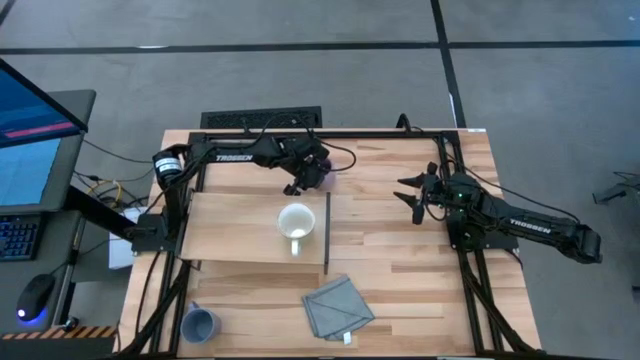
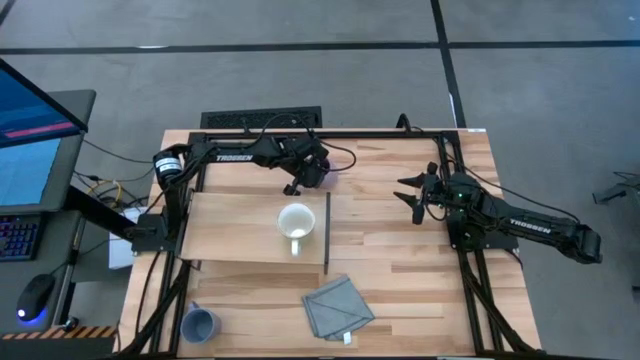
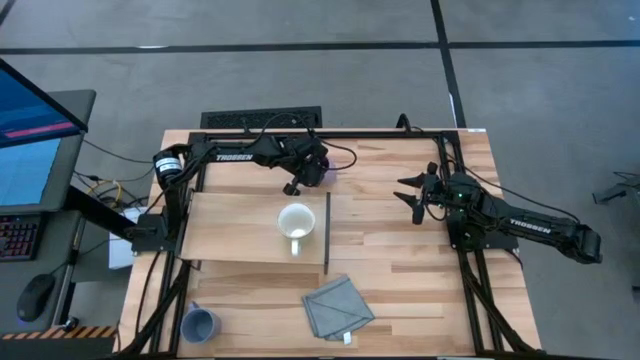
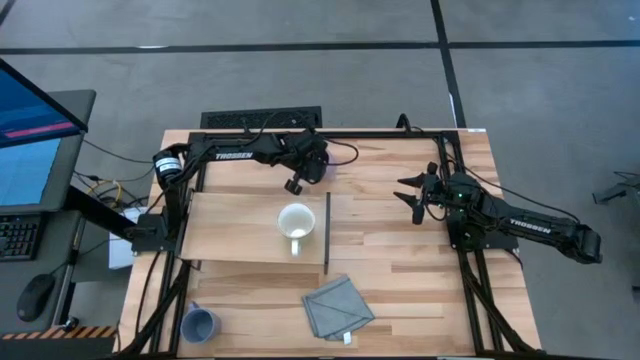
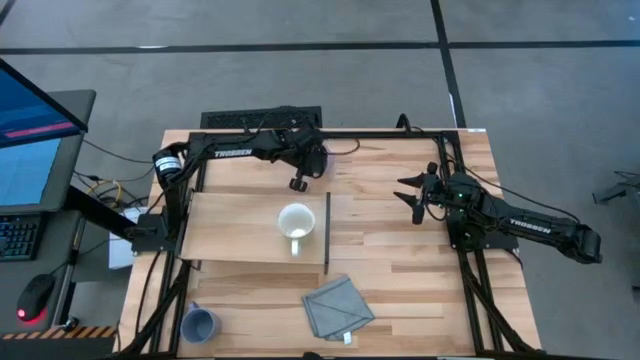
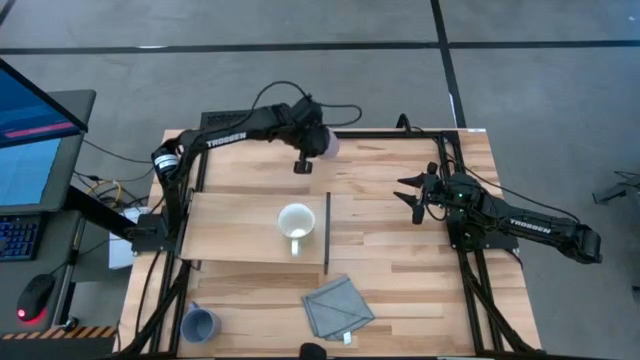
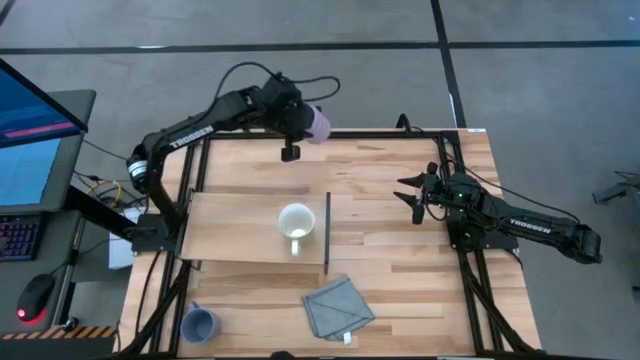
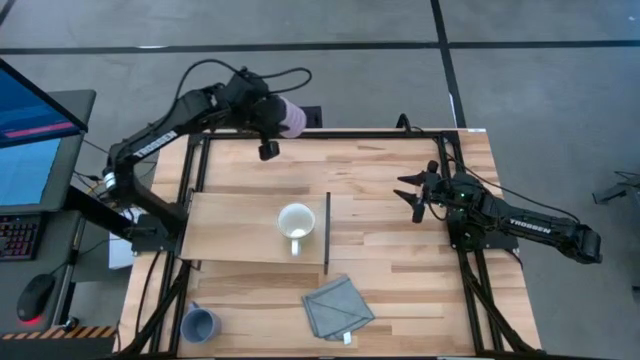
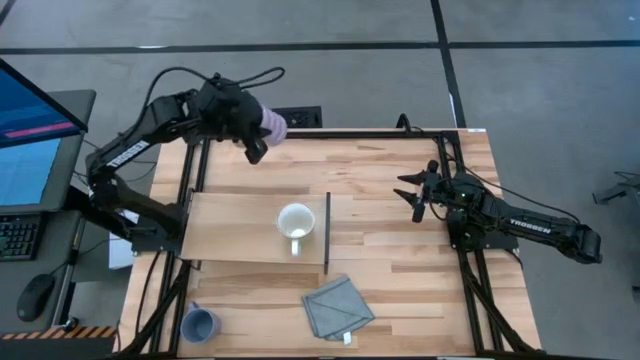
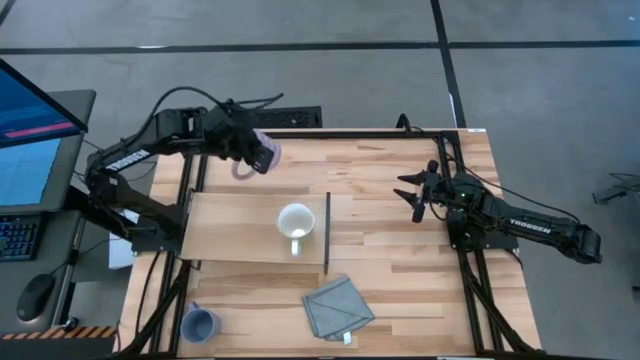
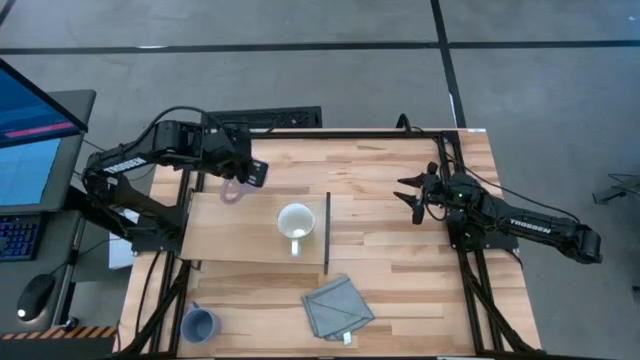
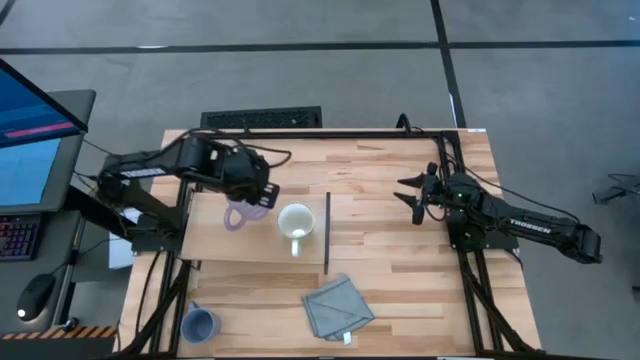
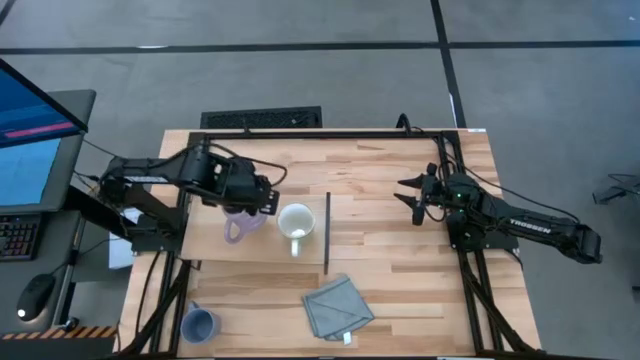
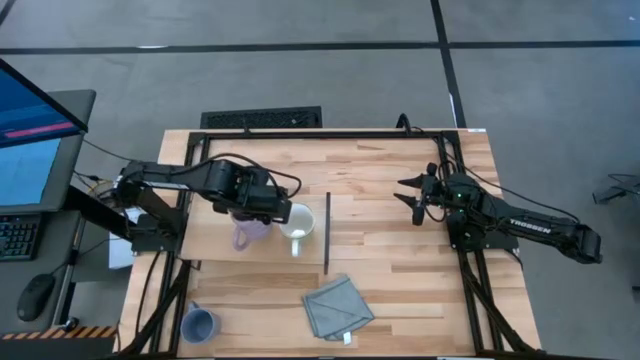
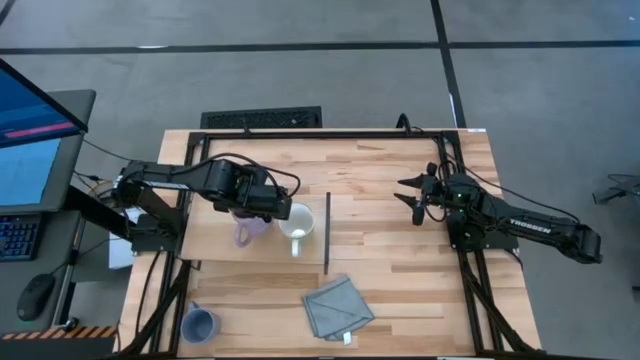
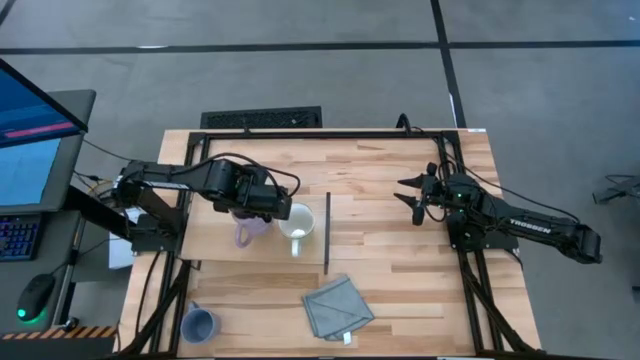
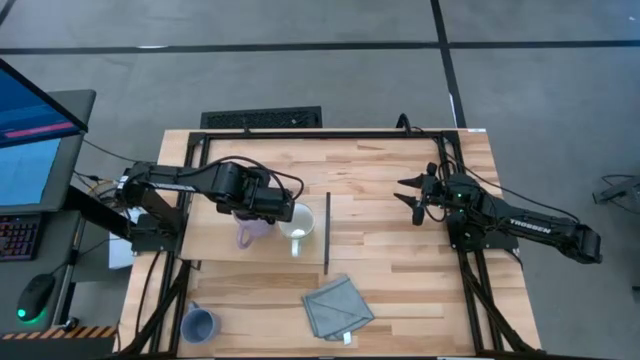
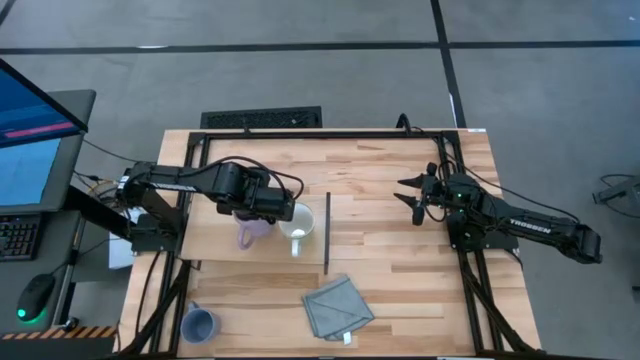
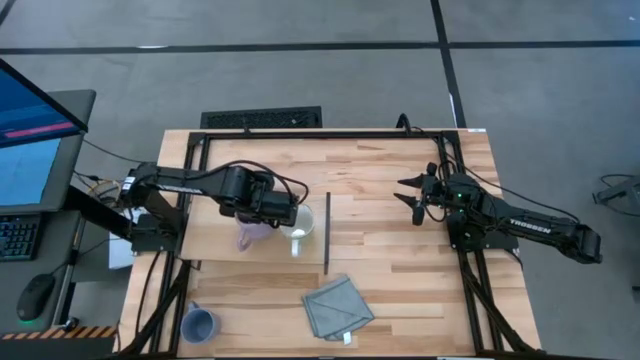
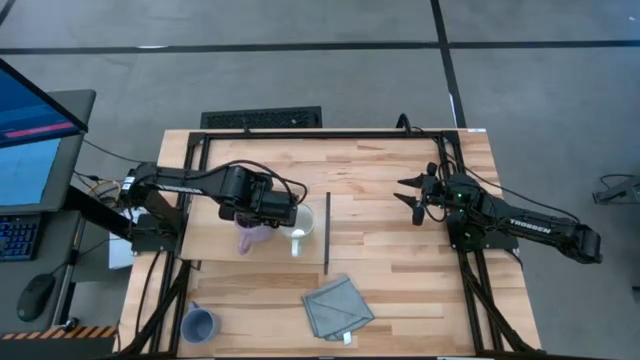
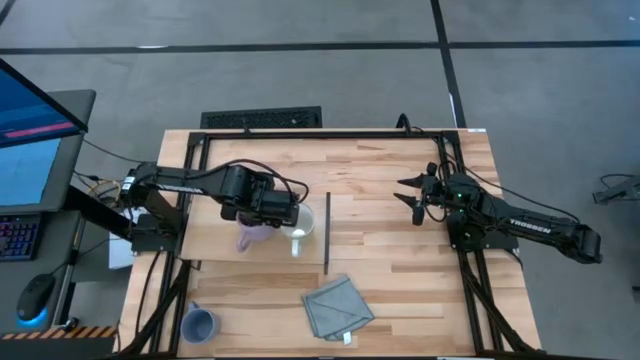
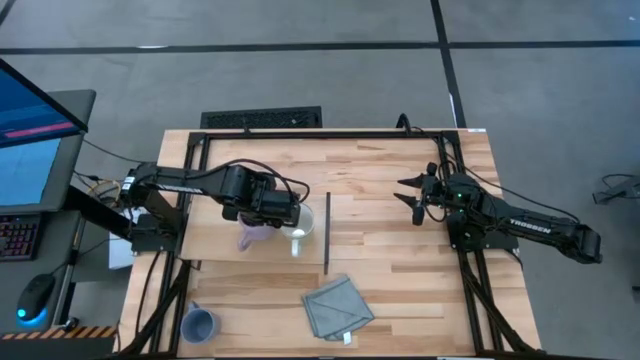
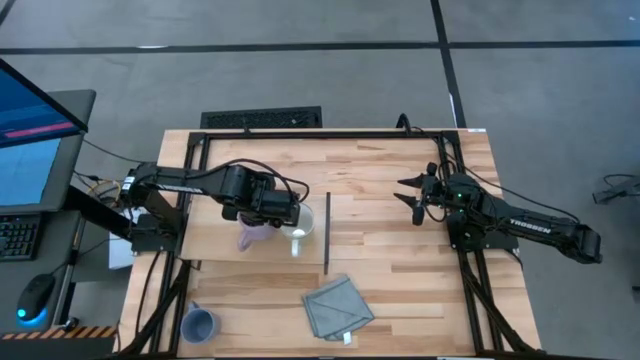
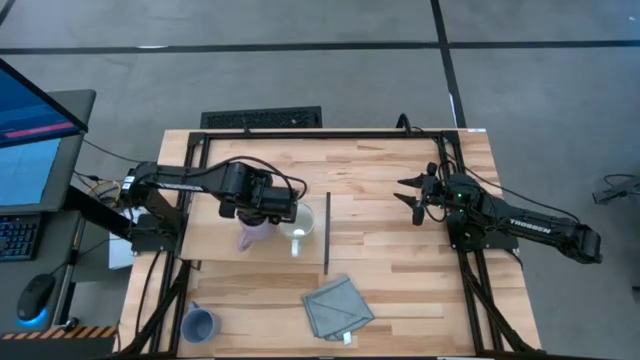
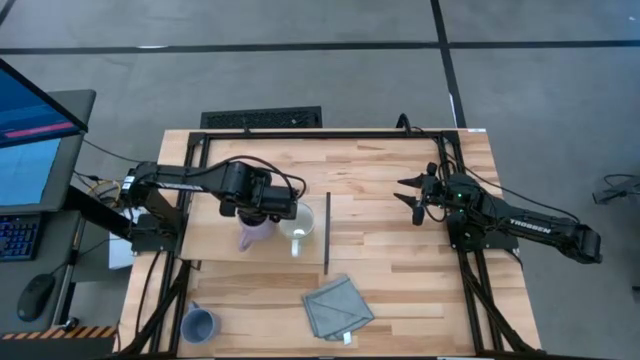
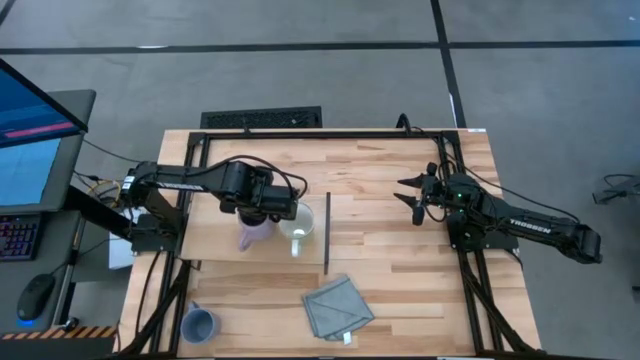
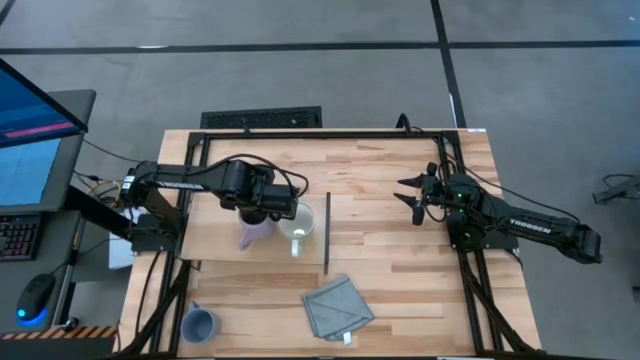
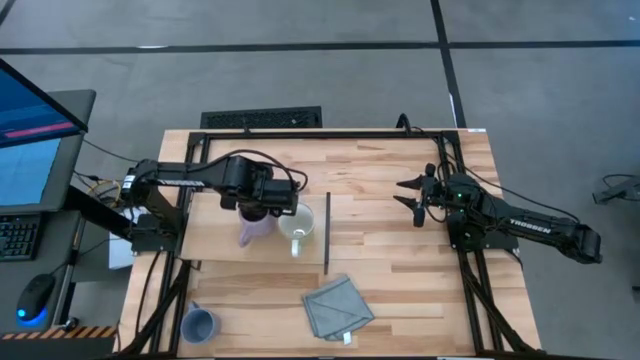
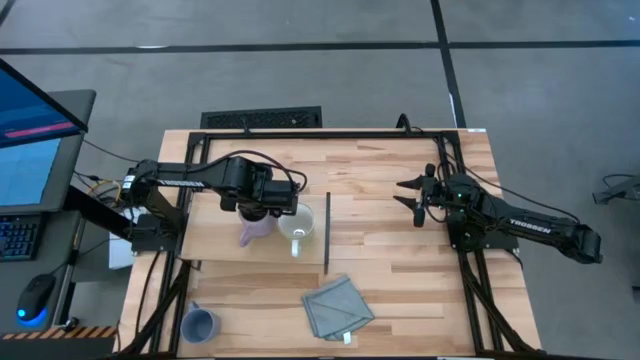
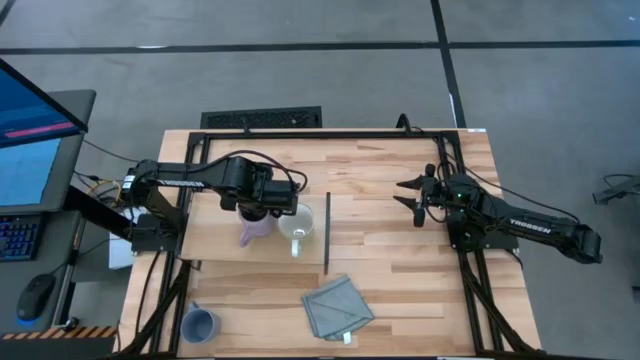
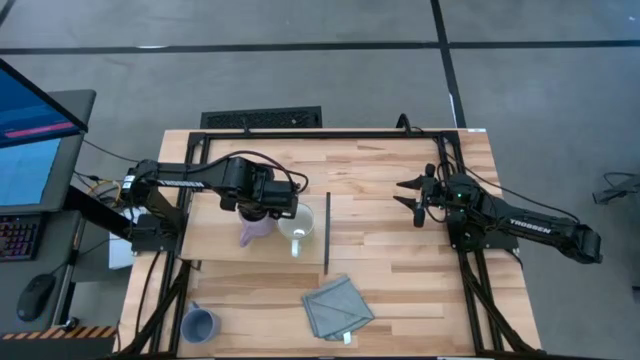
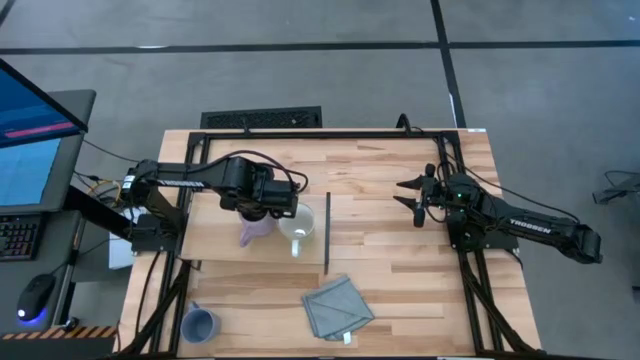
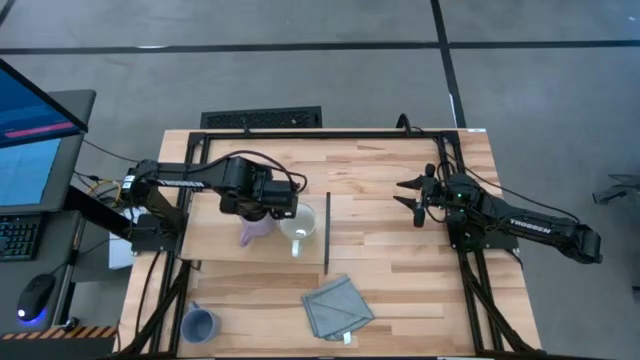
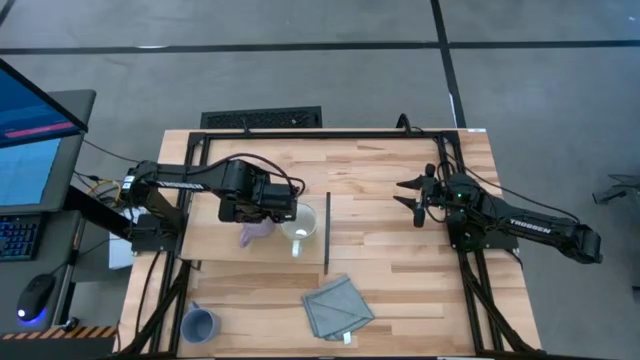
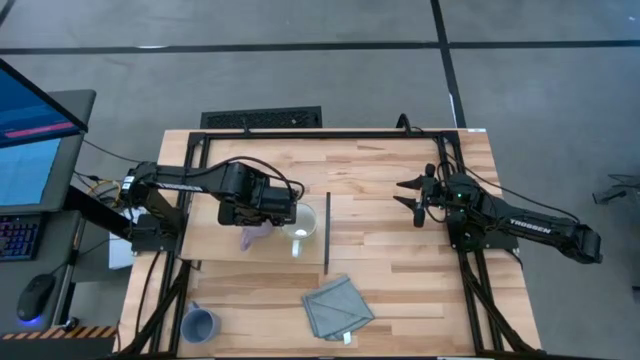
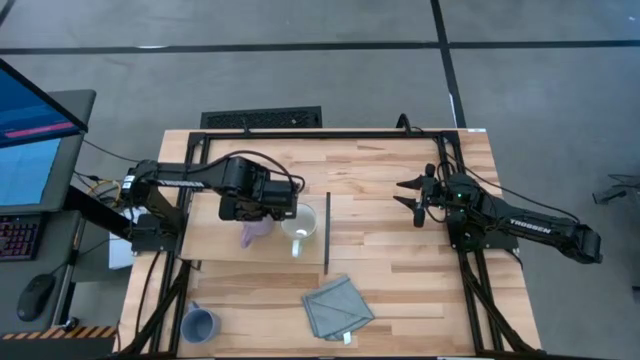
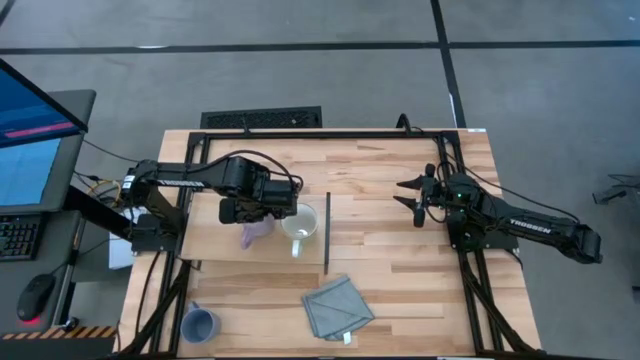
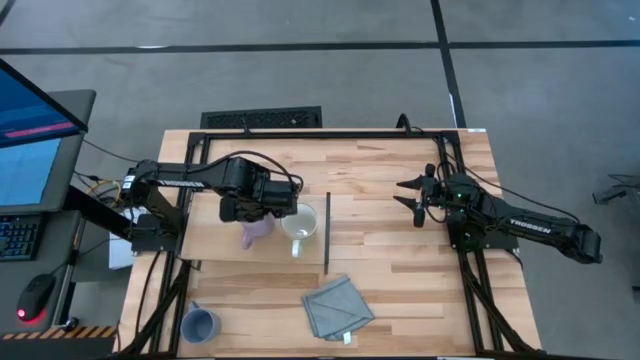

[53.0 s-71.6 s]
Task: Stack small to large cups/mugs on shelf
Put the purple mug on the shelf

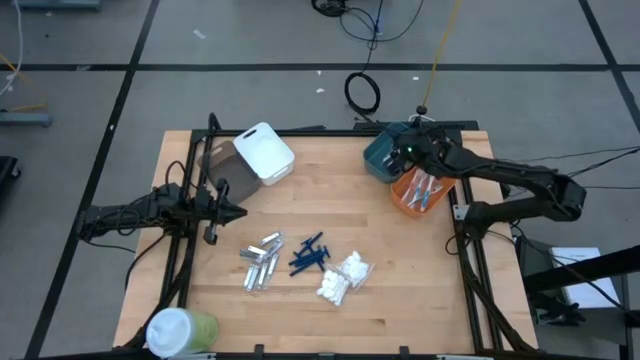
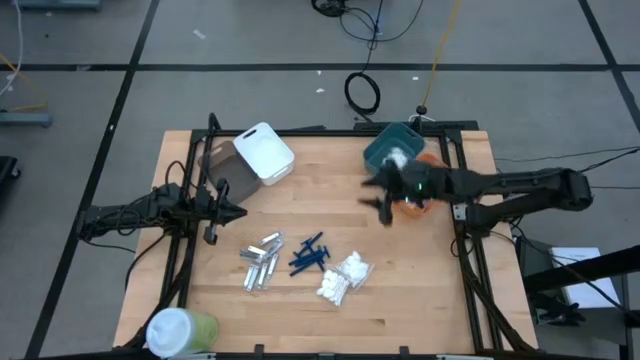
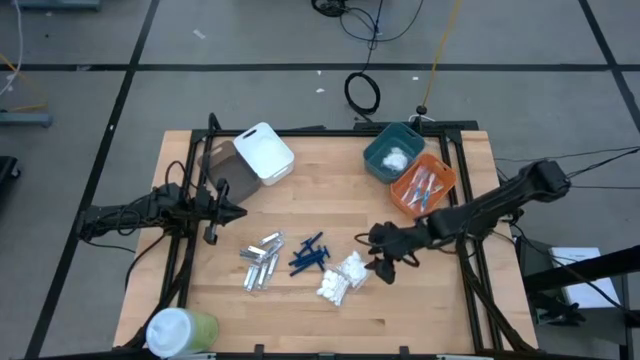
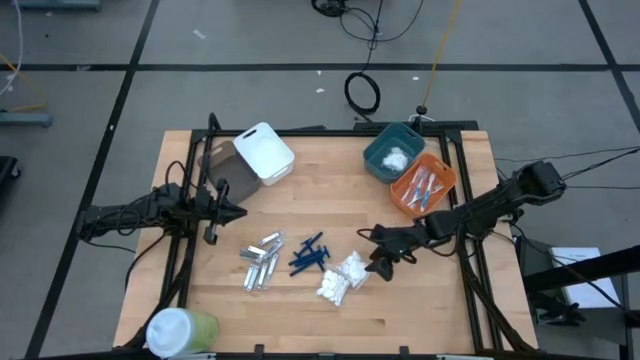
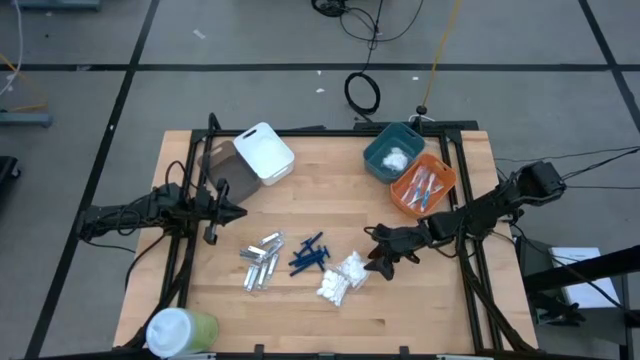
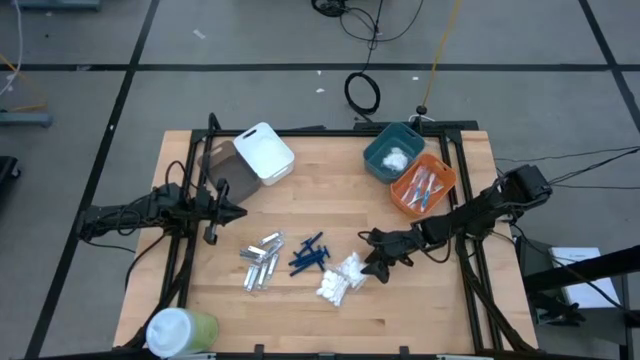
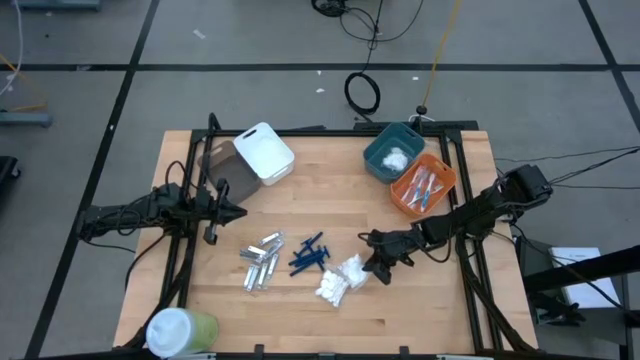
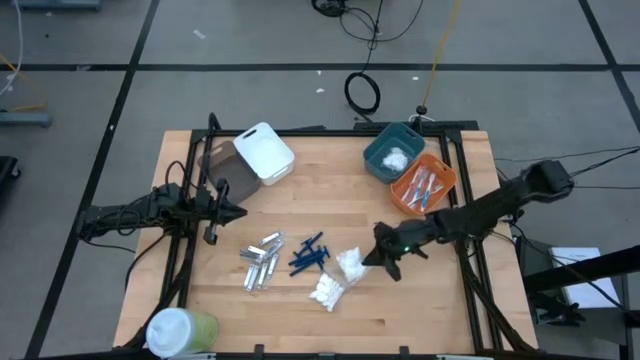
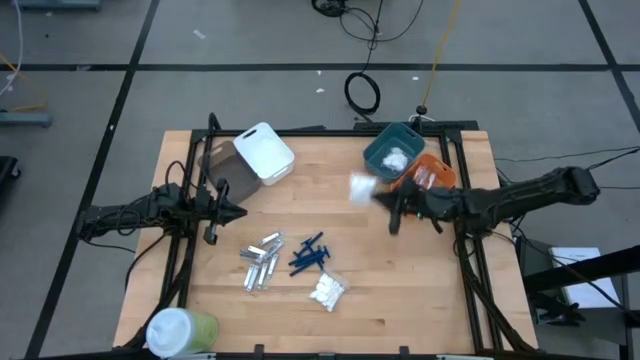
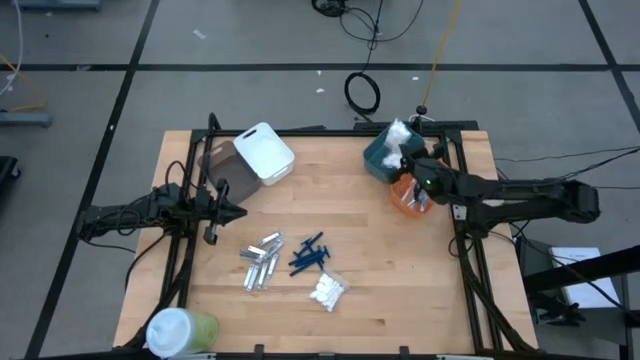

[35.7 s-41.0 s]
Task: Pick & Place Travel size toiletries
Put the right cotton pack into the green bin
